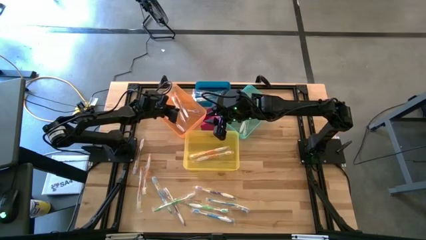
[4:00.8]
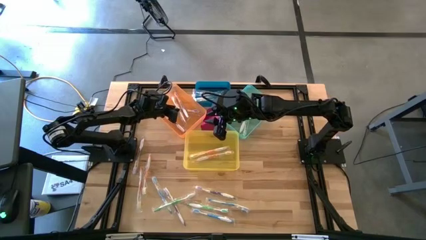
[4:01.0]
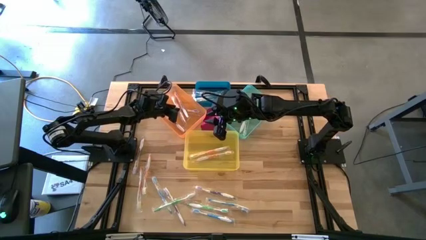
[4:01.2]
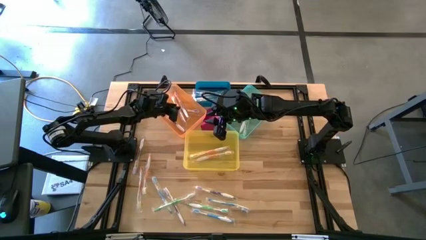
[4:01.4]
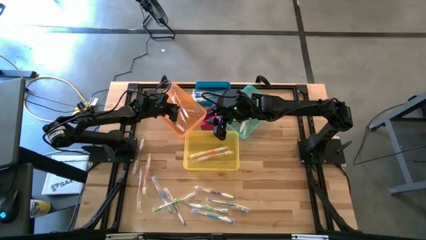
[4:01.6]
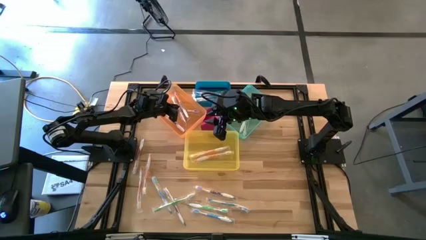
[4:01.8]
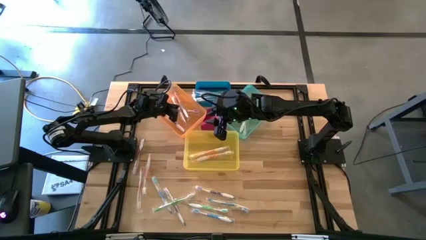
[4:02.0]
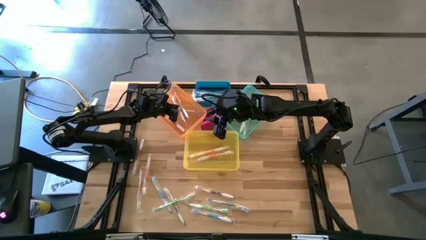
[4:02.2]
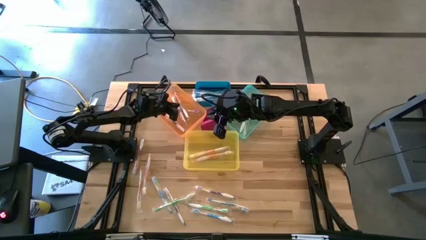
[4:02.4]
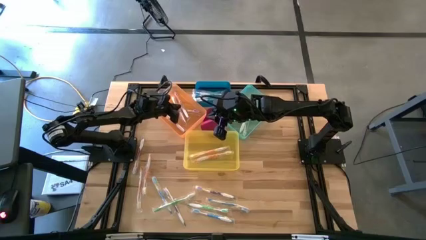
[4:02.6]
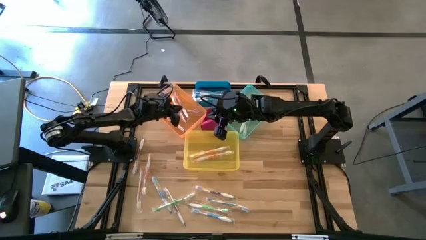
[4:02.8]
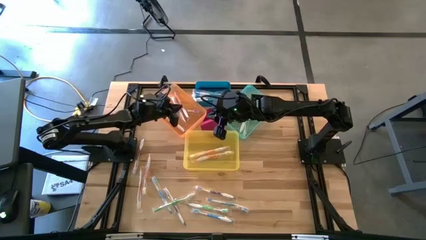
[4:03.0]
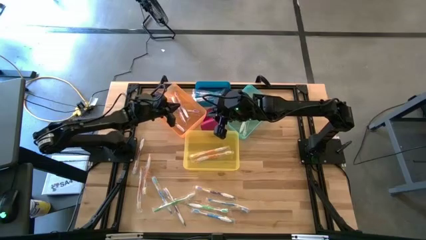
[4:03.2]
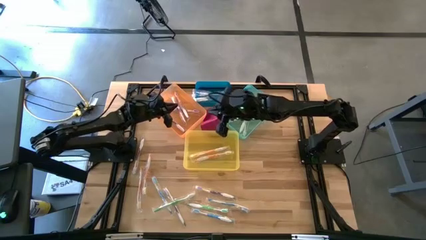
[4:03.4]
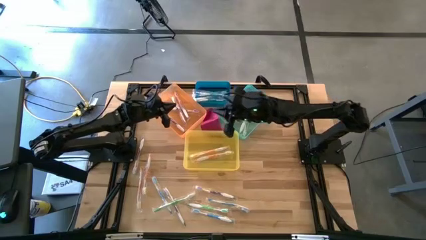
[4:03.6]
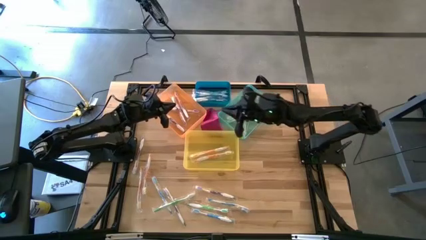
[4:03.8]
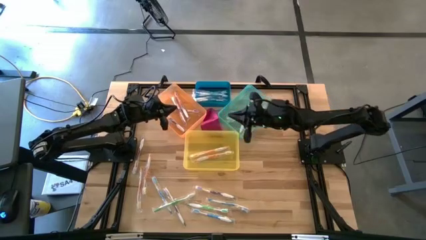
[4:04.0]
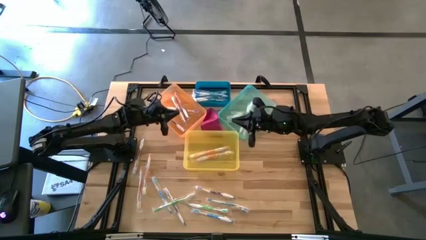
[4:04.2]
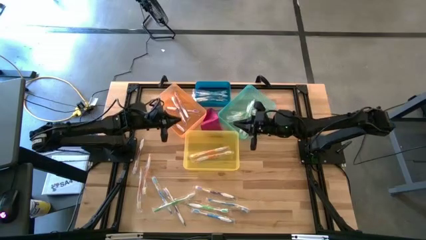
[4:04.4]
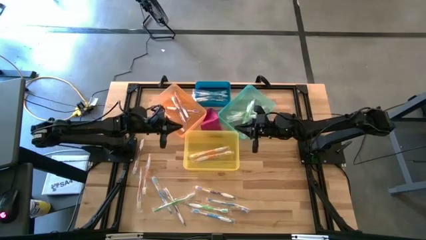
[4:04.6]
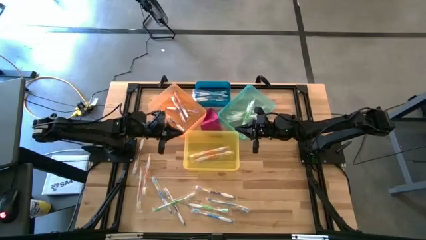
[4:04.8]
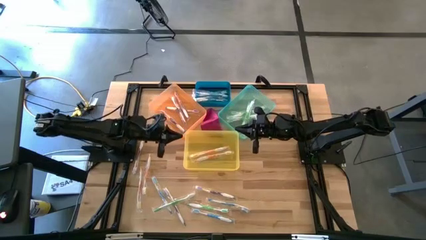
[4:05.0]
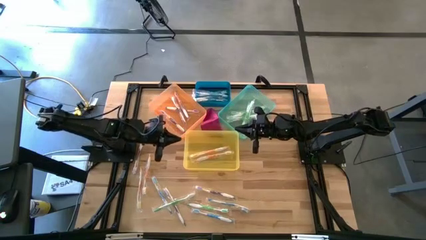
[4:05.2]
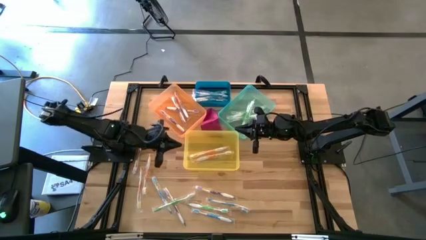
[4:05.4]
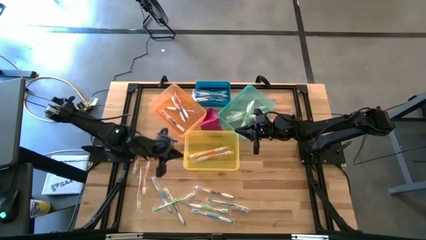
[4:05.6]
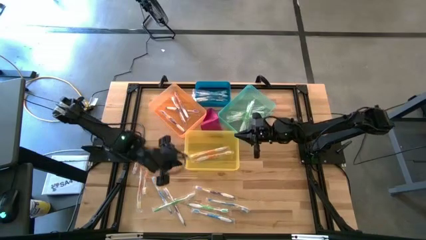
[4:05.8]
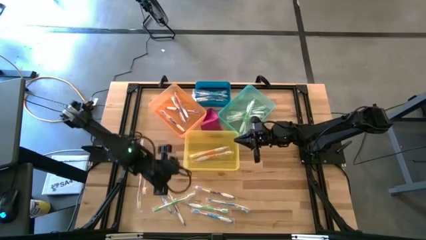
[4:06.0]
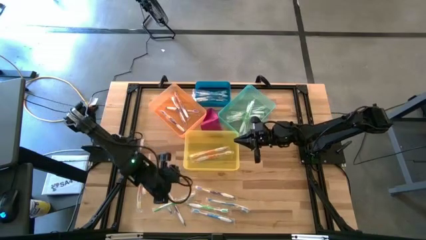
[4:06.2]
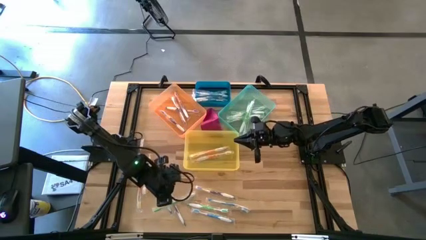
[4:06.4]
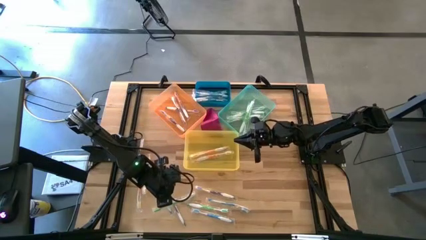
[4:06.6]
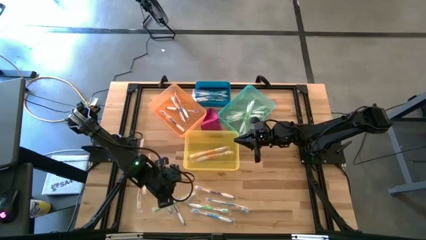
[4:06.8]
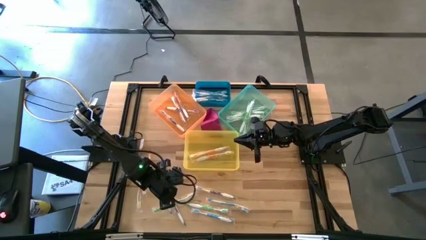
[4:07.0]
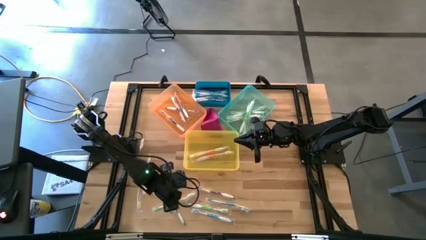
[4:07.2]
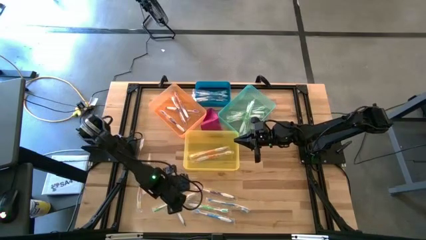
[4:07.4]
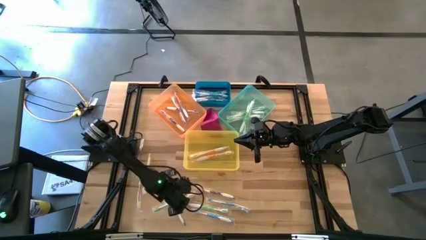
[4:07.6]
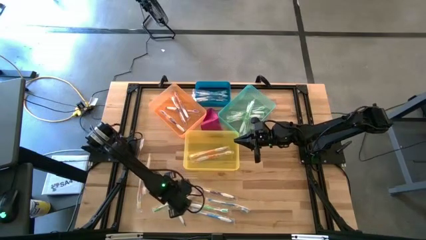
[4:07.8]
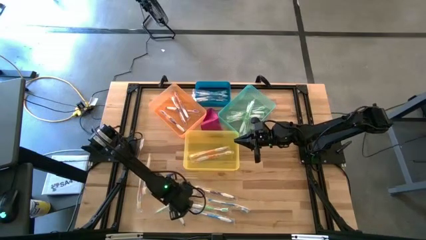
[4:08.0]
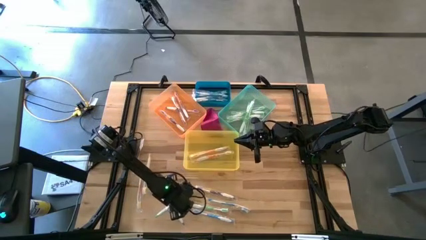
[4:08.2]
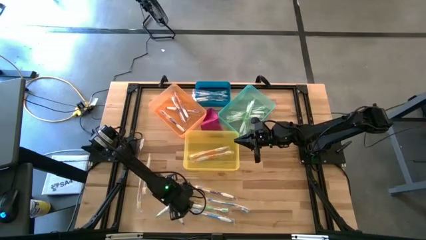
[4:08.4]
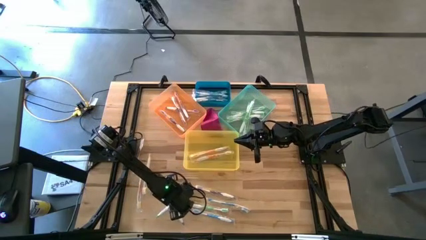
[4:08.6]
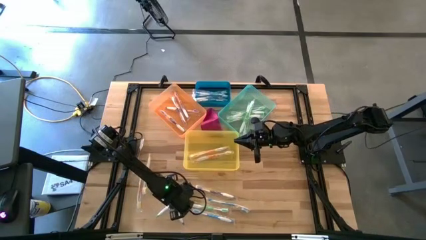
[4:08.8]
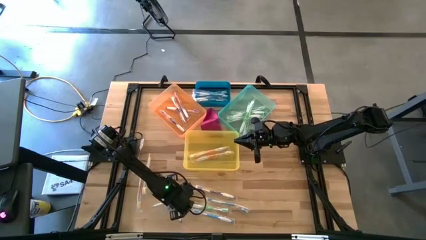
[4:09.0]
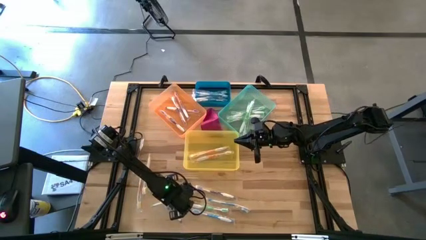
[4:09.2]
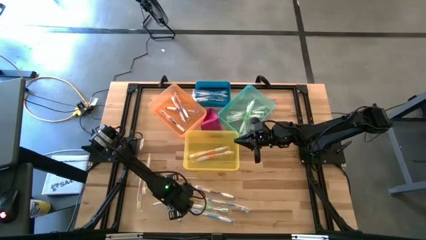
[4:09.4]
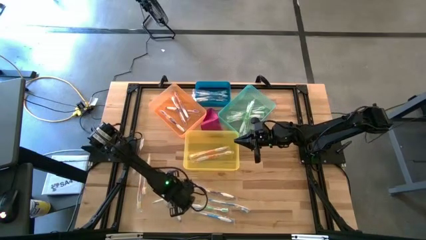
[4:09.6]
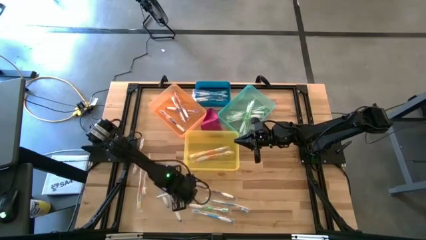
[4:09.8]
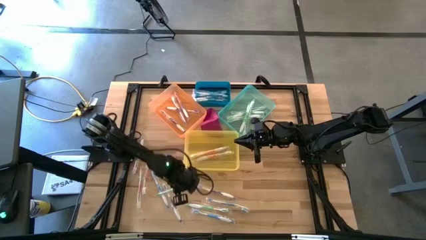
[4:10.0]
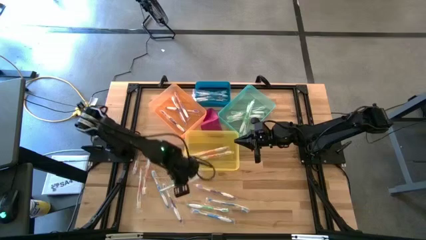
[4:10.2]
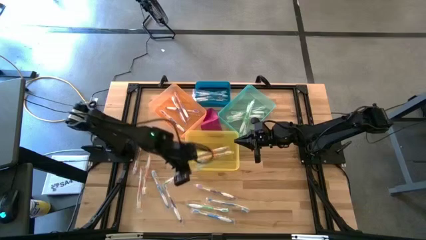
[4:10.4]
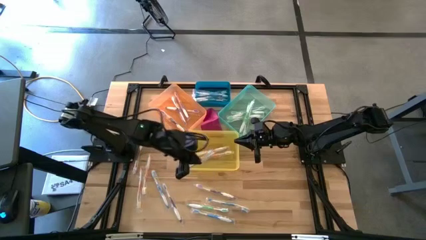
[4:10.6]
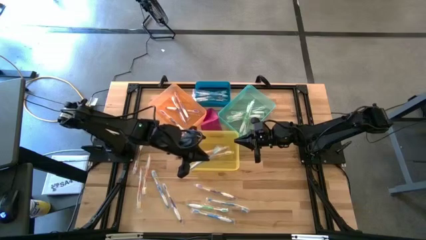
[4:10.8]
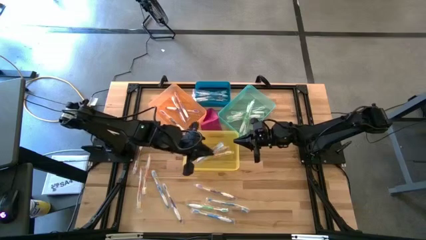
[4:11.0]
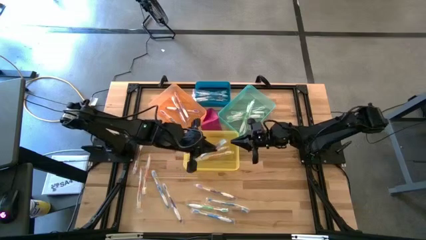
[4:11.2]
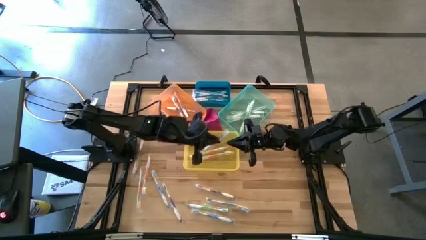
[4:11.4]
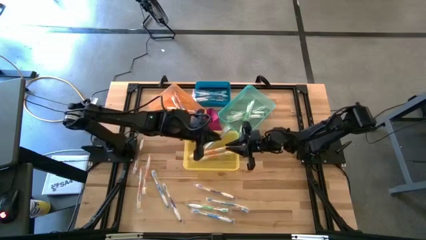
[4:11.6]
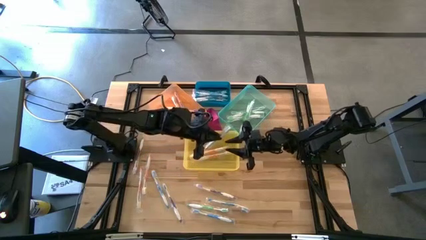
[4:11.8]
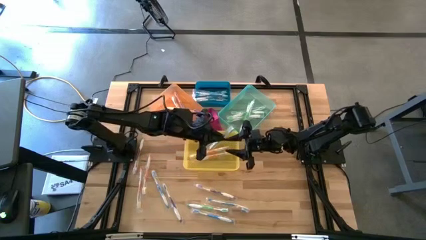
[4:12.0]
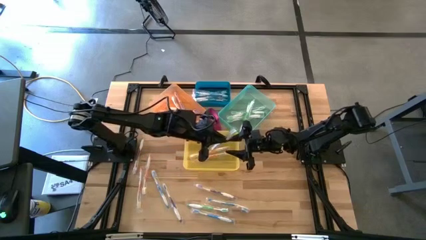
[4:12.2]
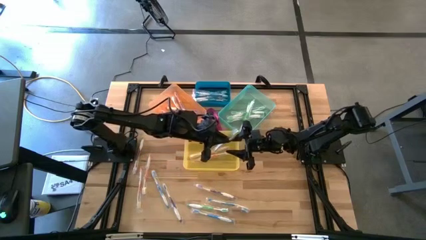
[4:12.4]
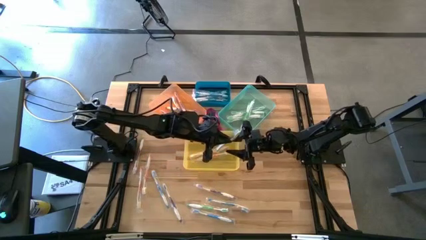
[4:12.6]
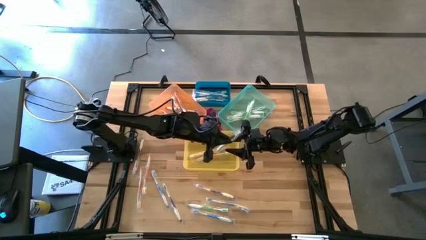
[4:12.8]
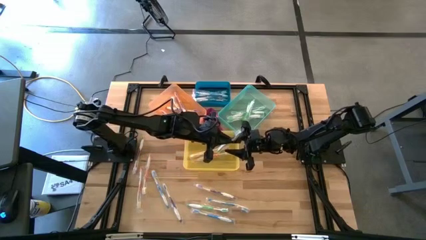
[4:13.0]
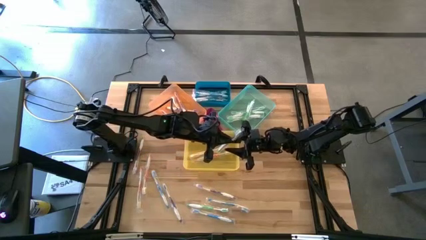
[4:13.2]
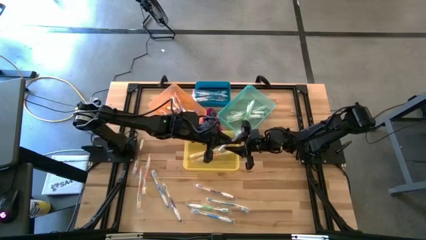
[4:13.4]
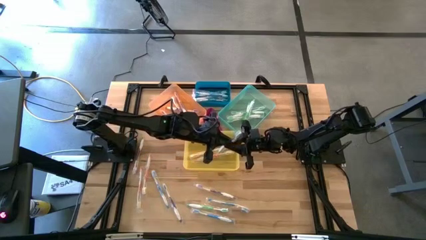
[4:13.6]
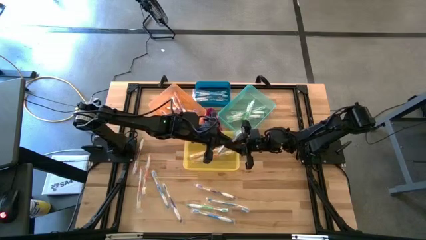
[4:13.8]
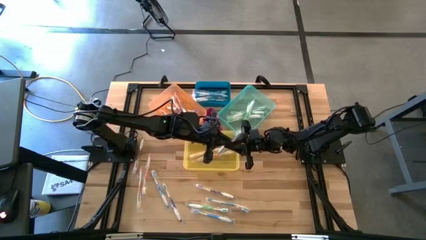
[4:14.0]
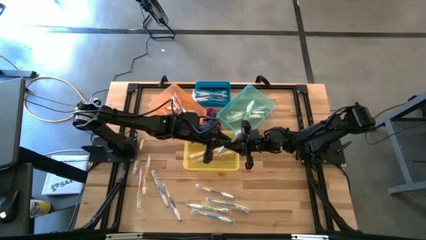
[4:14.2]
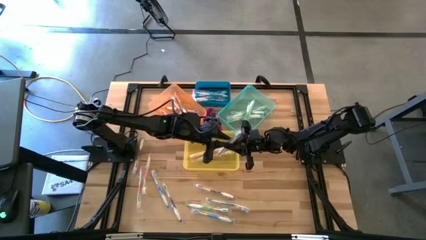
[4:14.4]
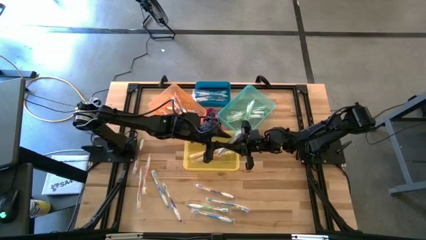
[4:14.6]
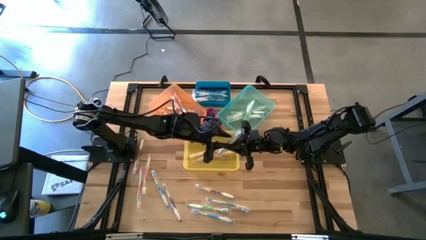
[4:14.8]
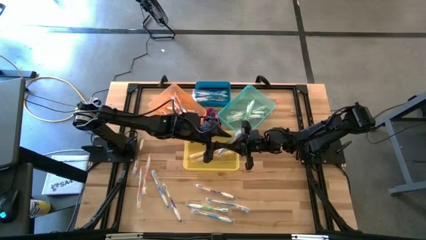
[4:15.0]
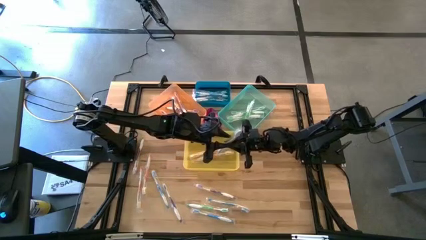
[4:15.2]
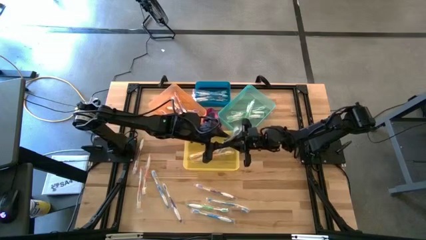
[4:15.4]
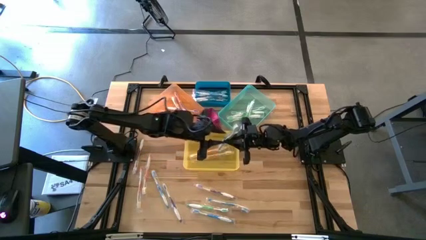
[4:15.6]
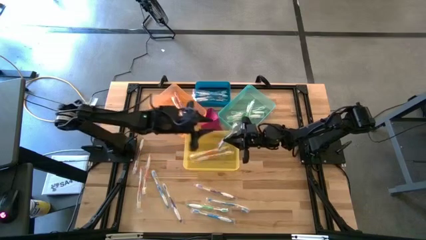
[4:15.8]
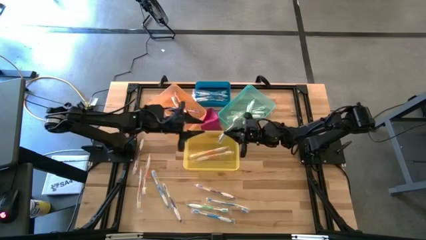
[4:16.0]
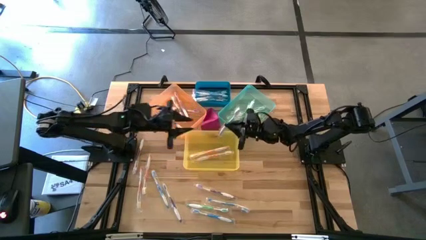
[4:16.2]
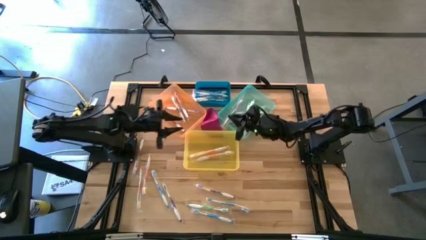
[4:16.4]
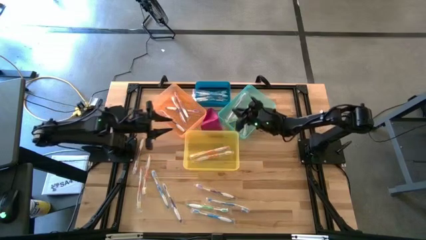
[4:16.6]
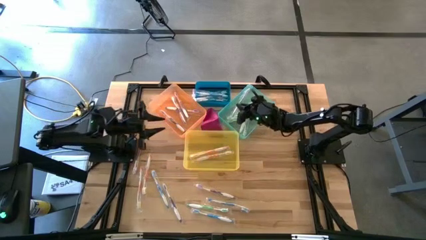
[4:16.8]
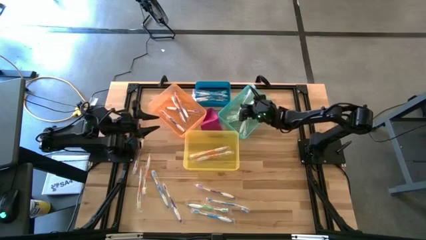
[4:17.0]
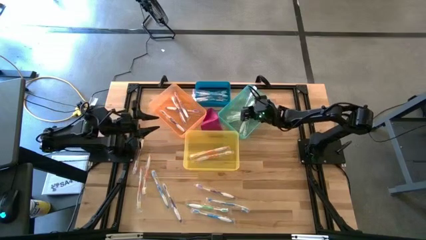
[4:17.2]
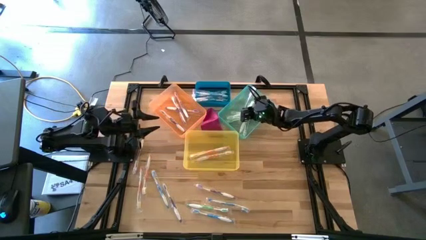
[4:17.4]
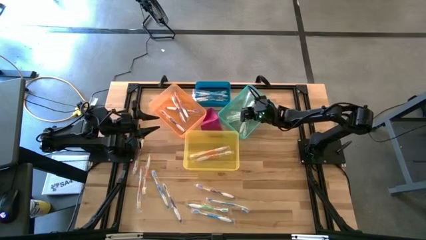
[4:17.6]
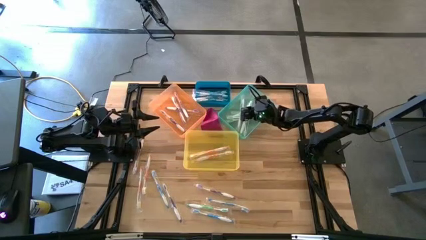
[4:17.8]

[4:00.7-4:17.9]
Task: Pick & Place Toothbrushes
Put the green toothbrush into the green bin
